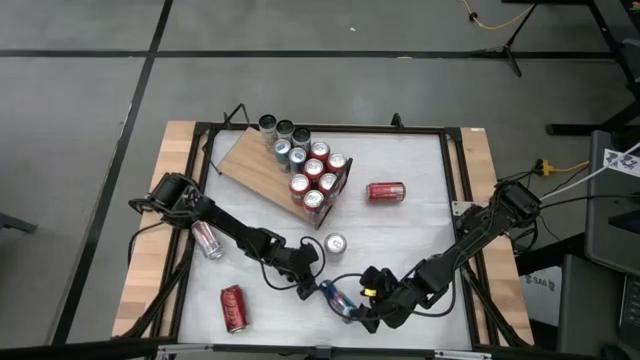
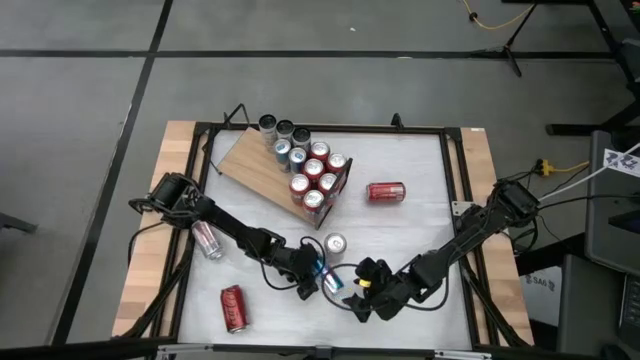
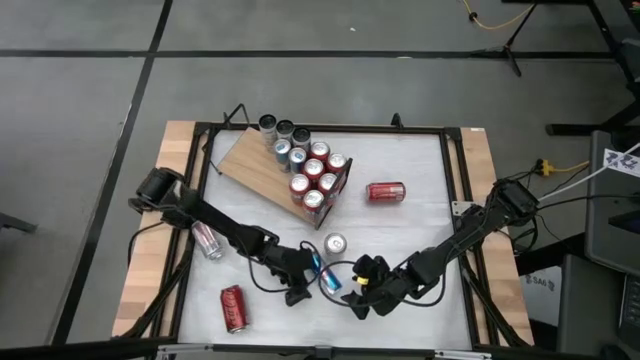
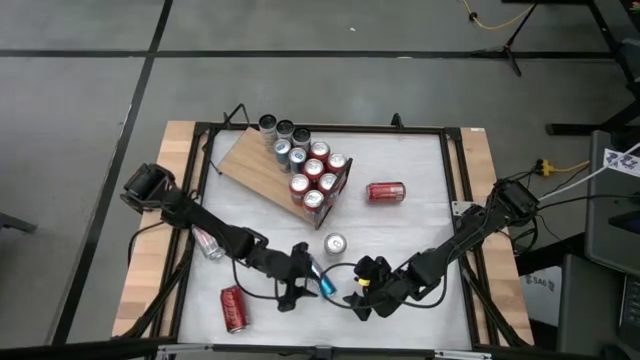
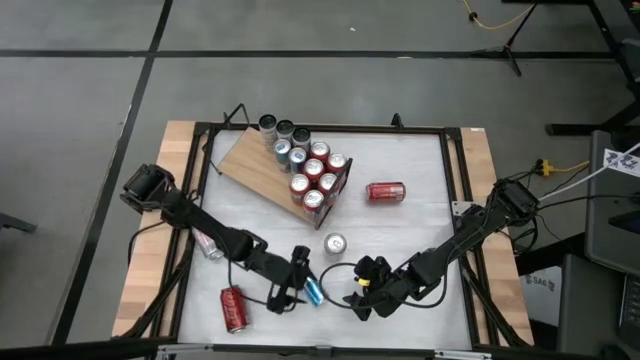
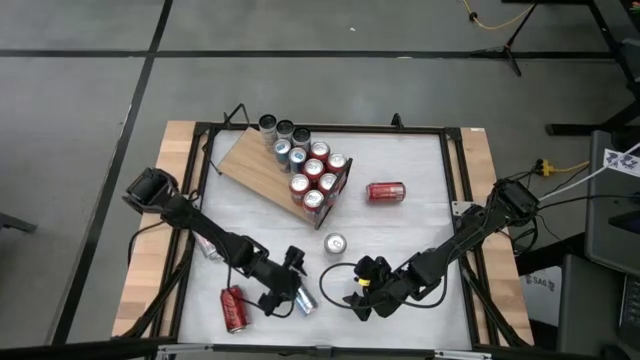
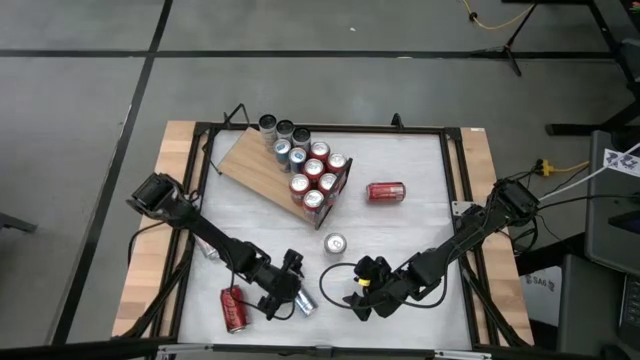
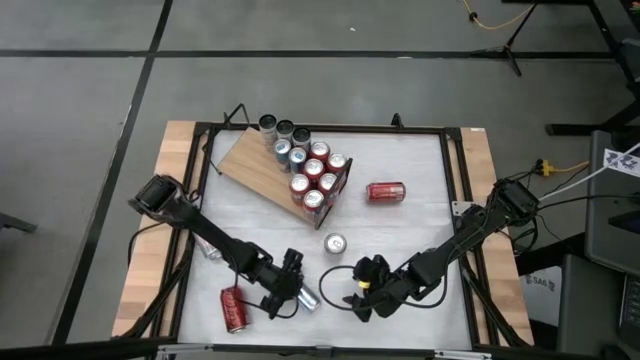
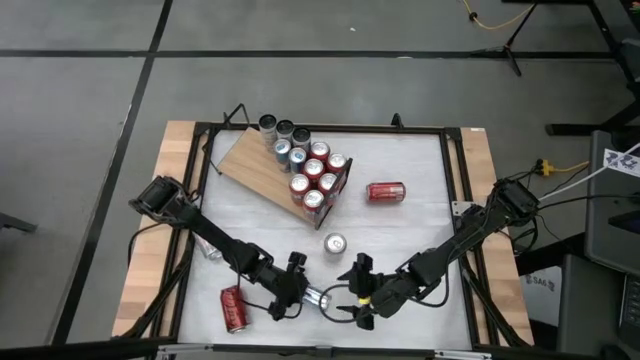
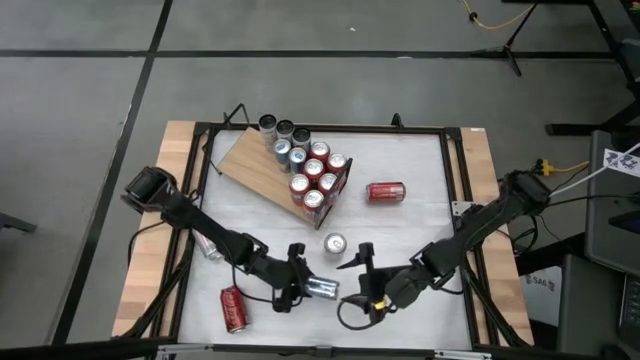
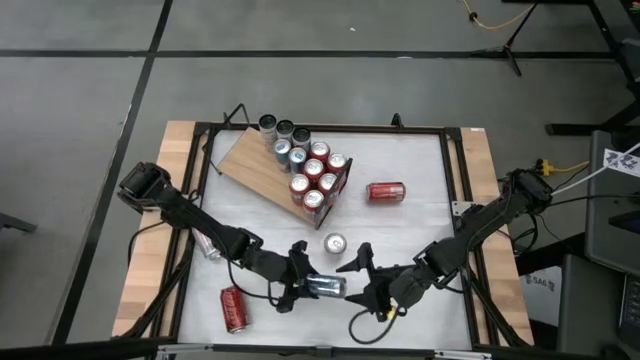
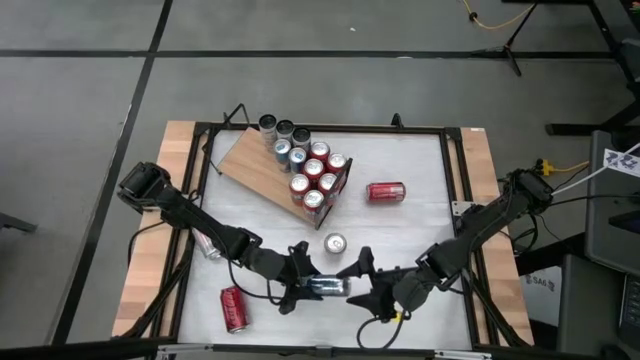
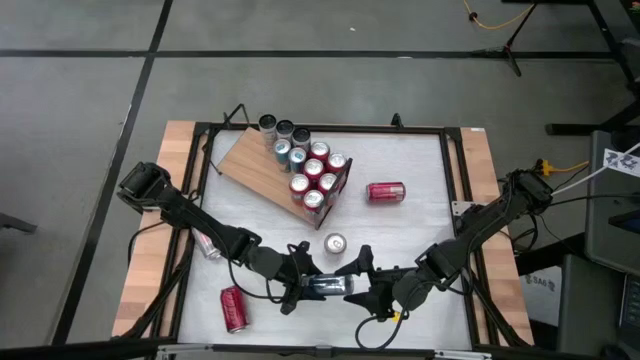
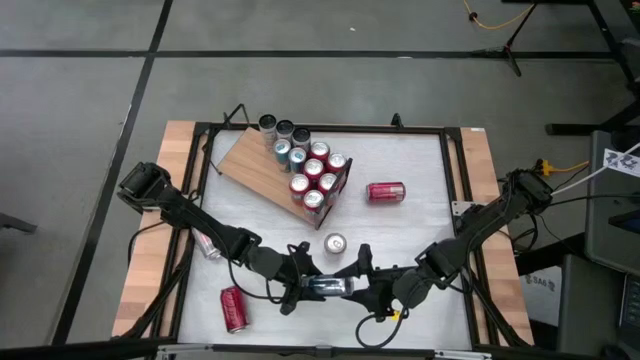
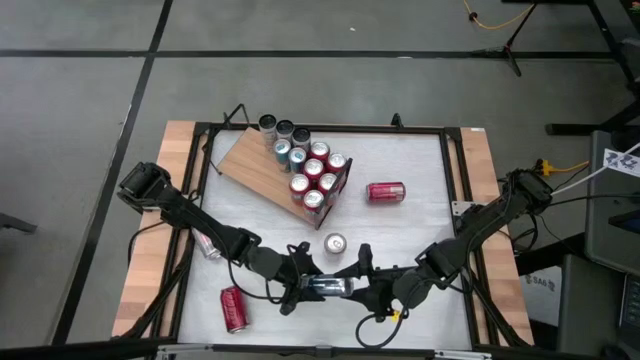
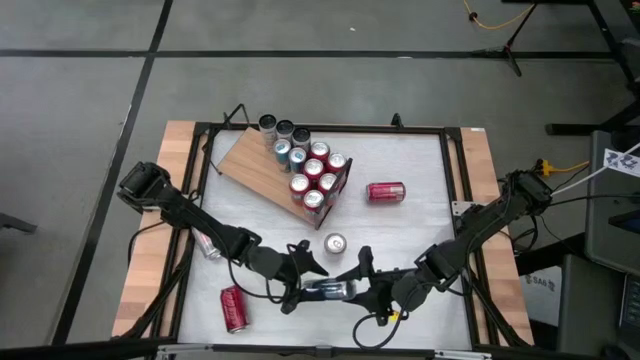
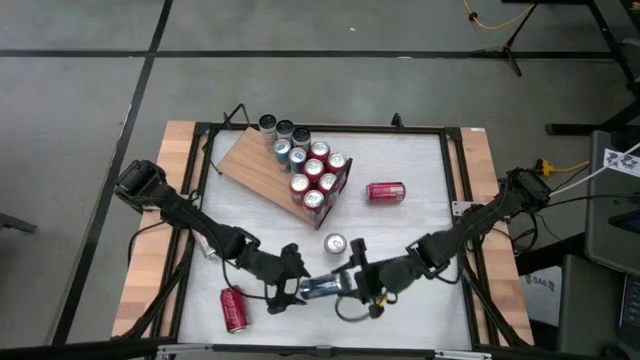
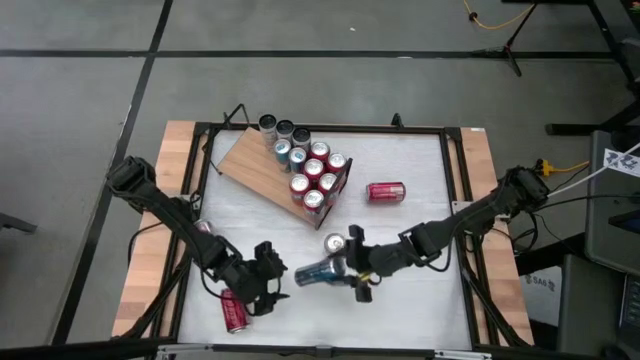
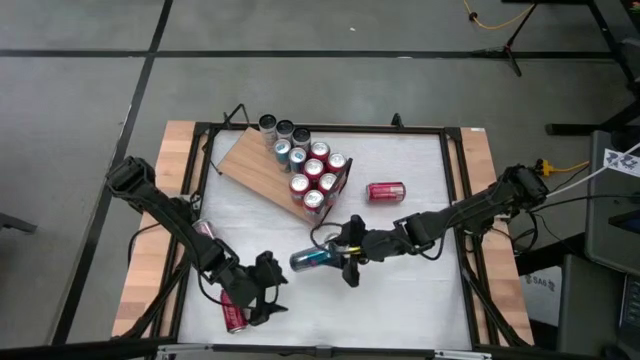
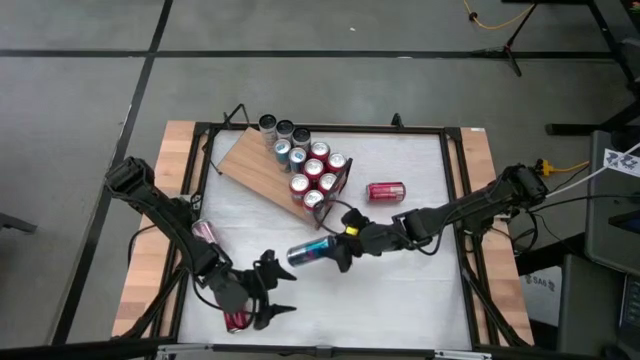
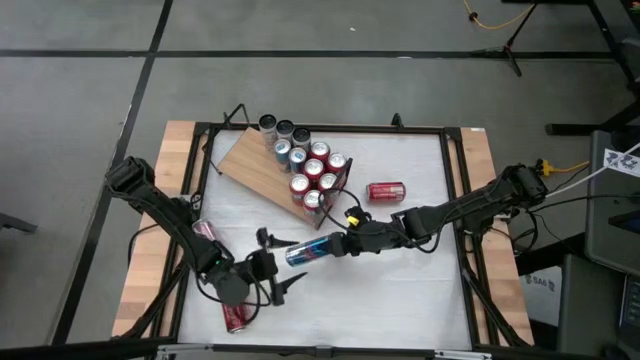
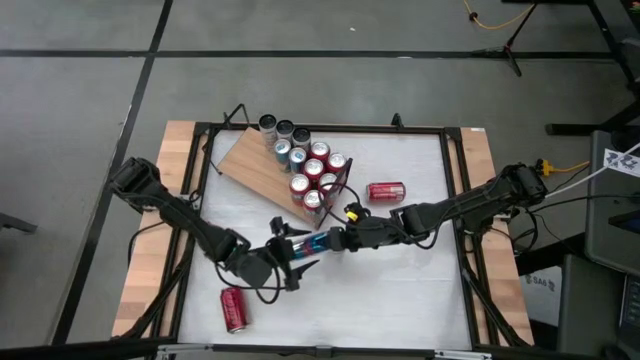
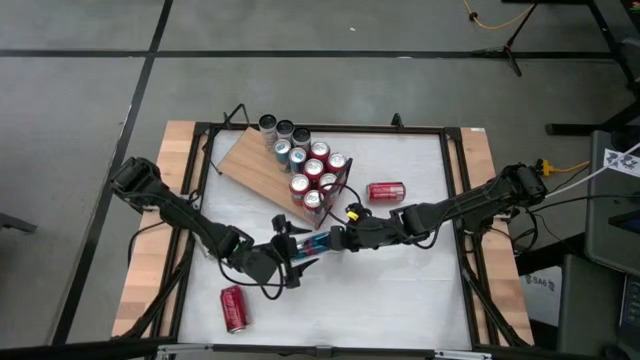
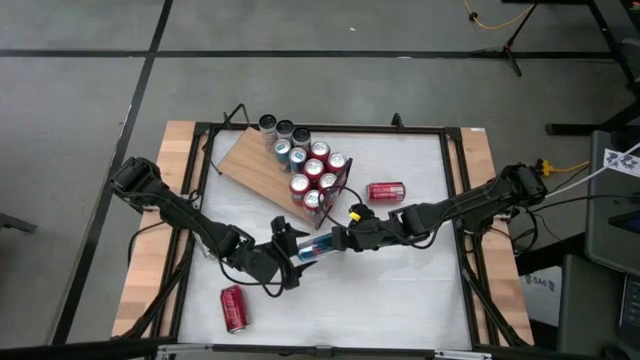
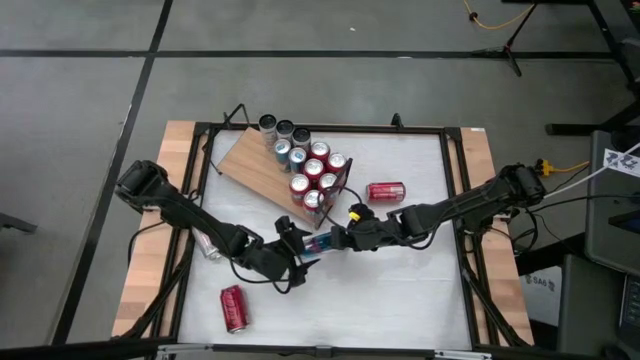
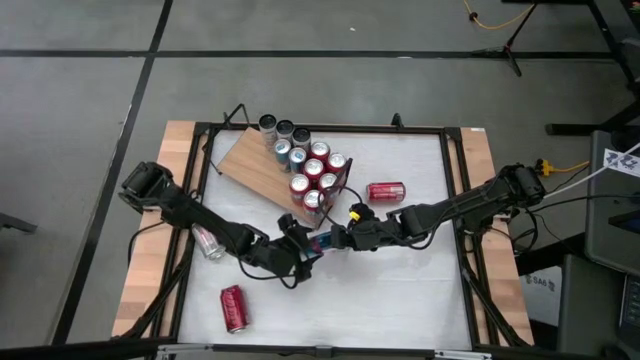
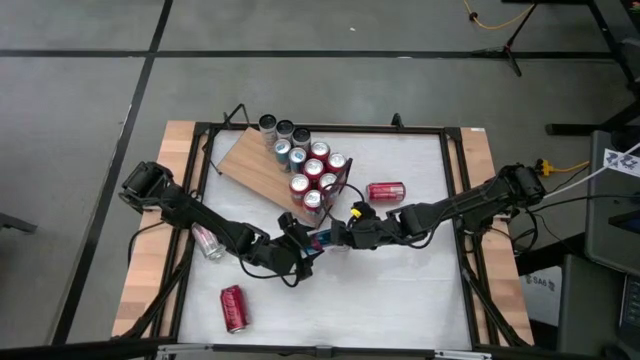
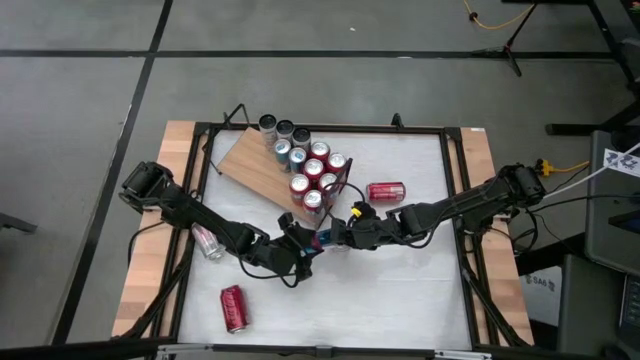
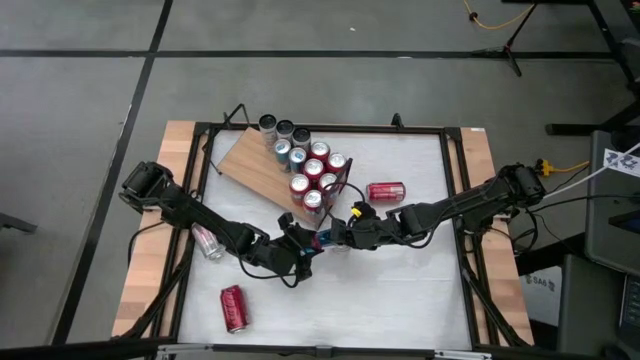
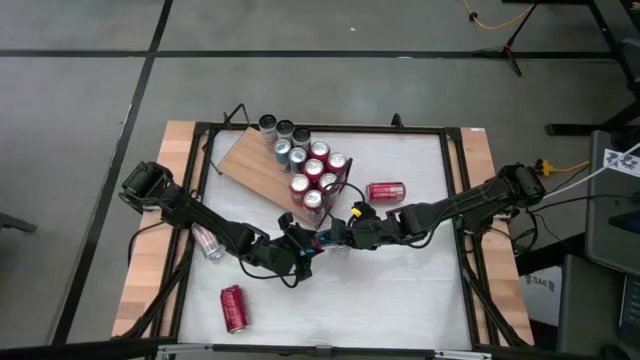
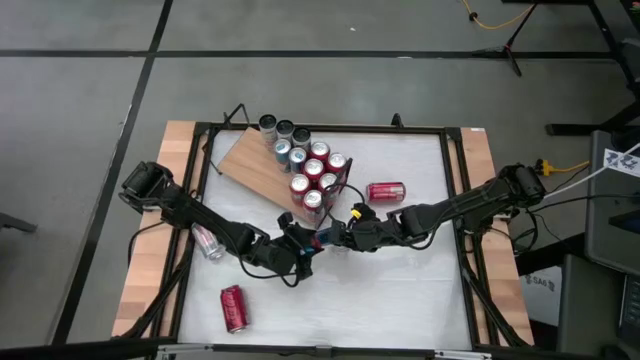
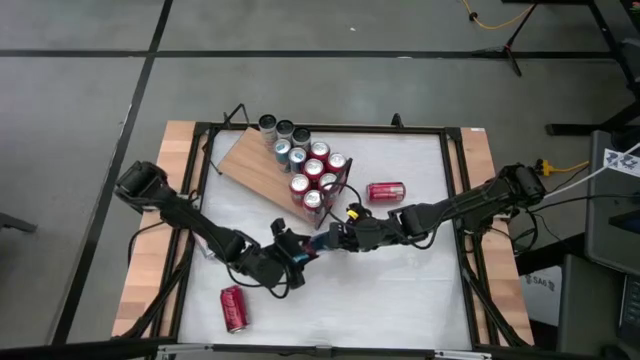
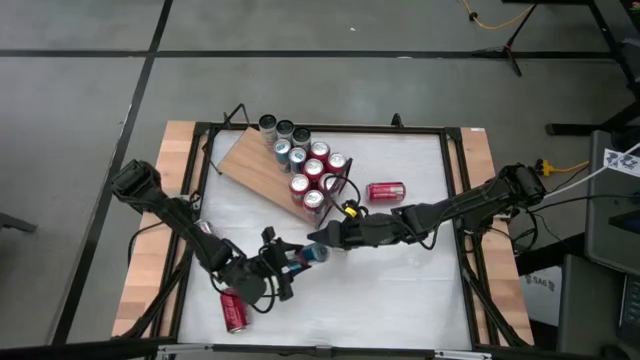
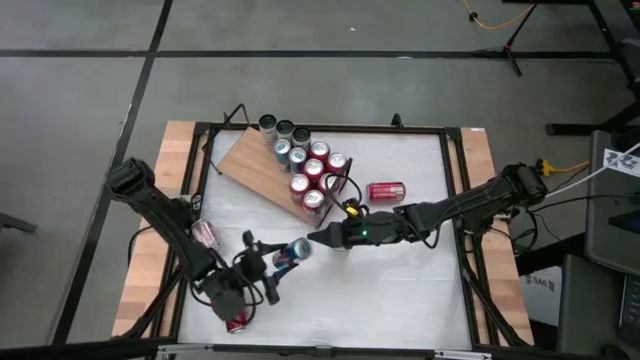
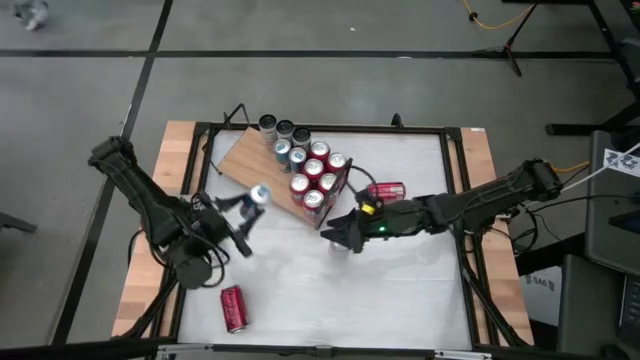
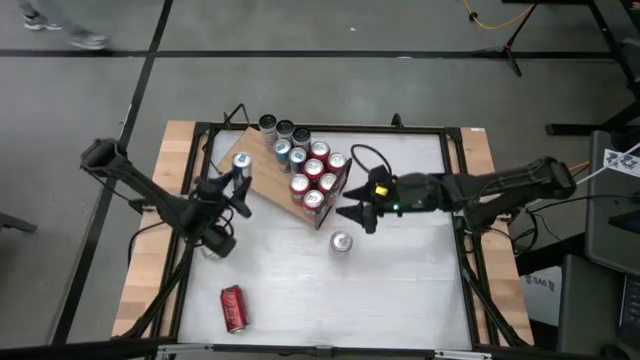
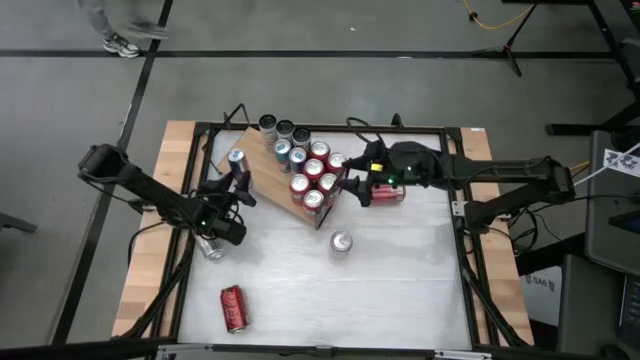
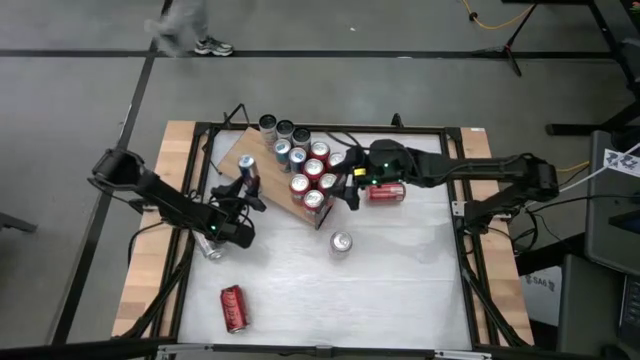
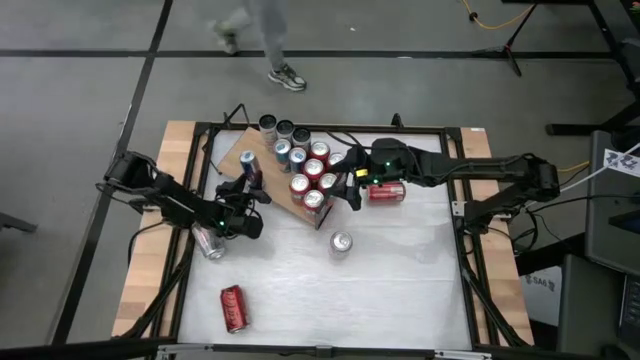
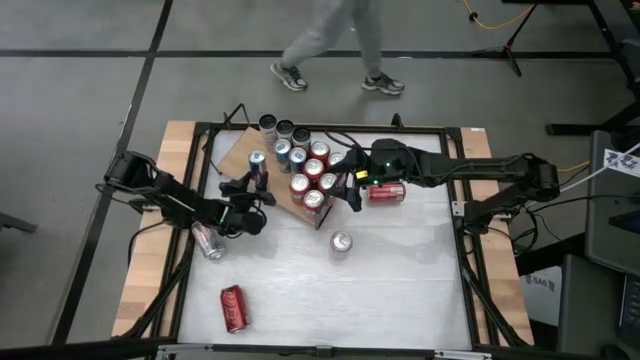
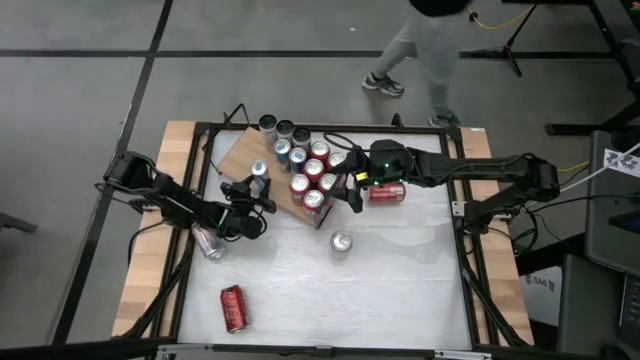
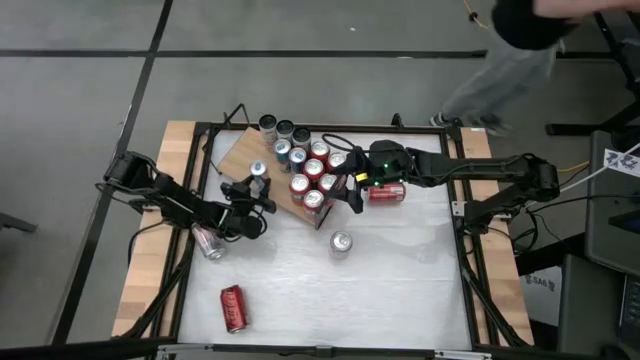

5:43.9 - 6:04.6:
Task: Pick and place cans onto a shelf
Put the blue and white soda can on the shelf aligned with the other blue and white soda cans

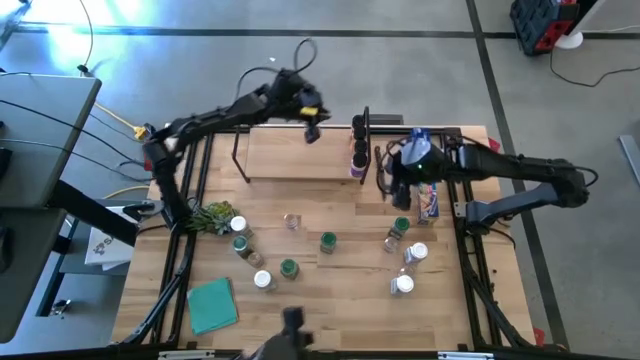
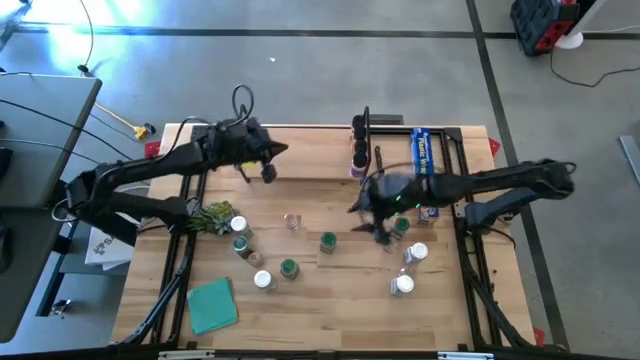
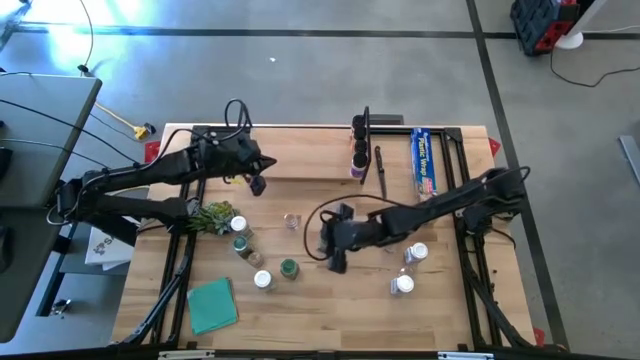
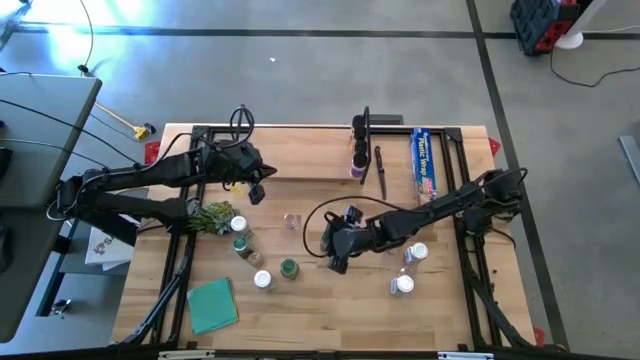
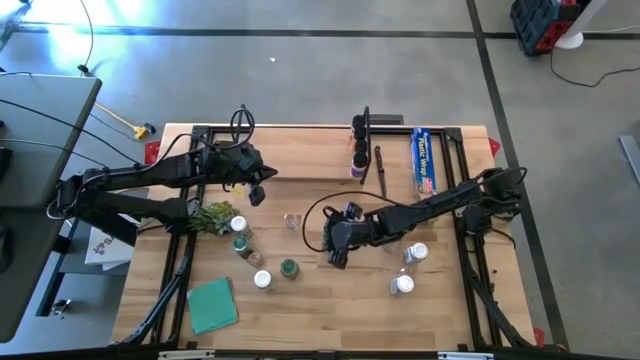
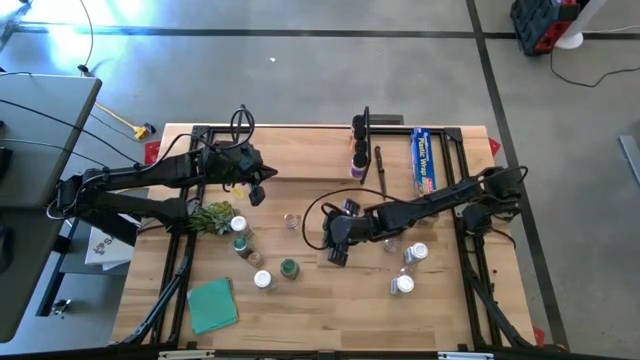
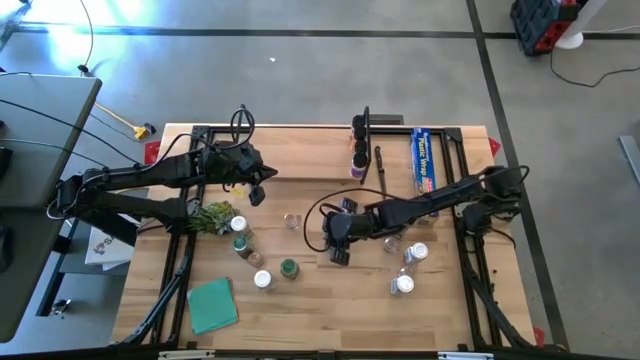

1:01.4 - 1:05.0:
Task: Shelf spices
Put the green seasoning bottle on the shelf
